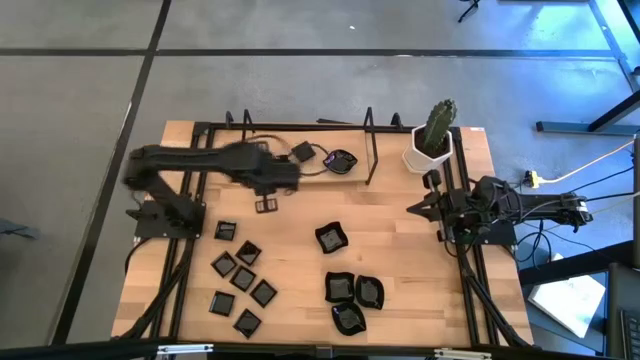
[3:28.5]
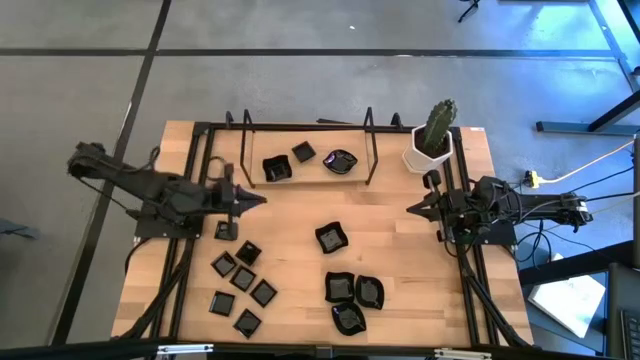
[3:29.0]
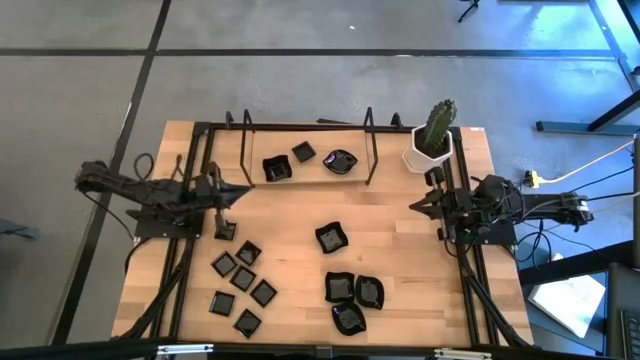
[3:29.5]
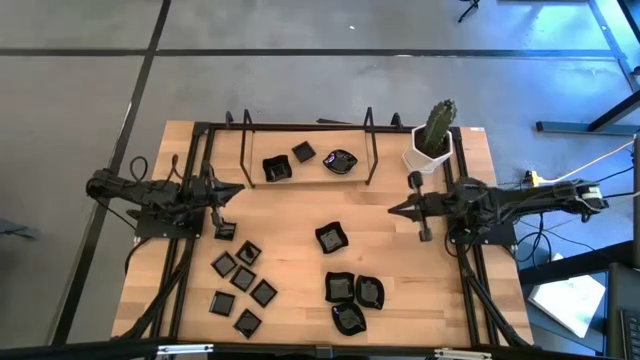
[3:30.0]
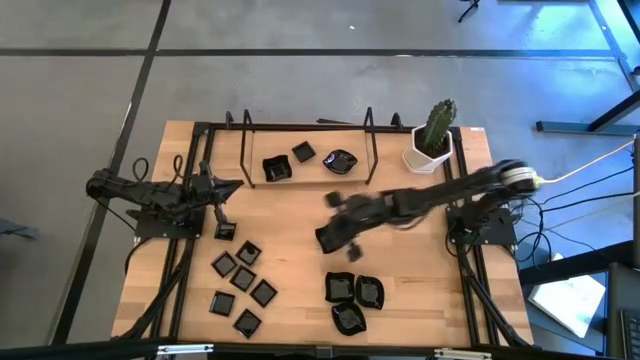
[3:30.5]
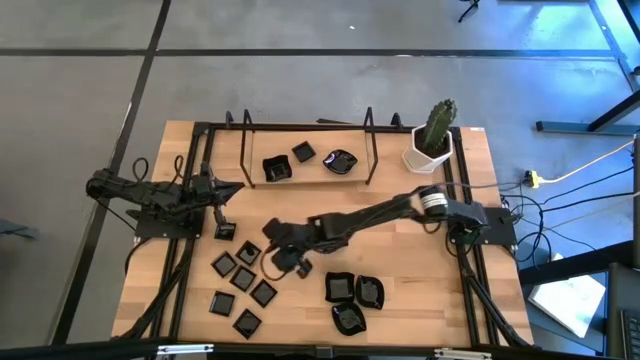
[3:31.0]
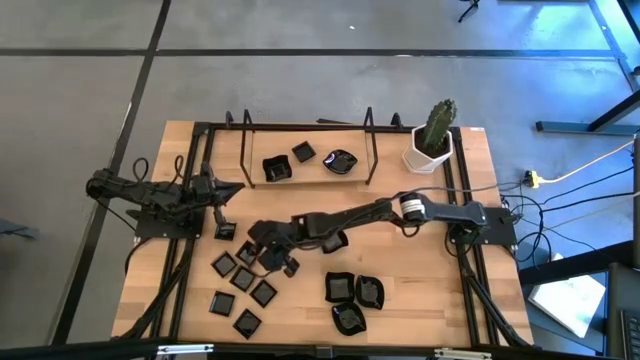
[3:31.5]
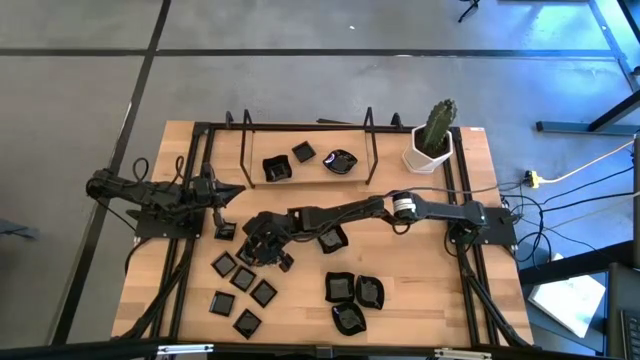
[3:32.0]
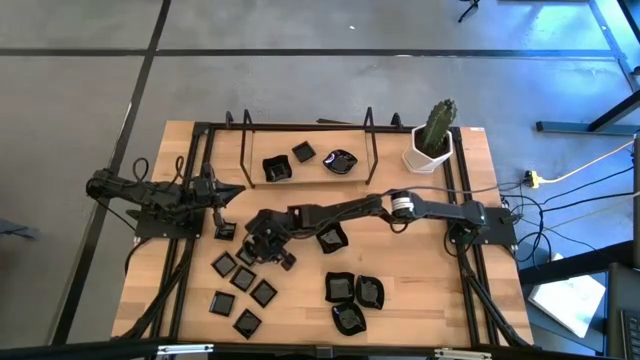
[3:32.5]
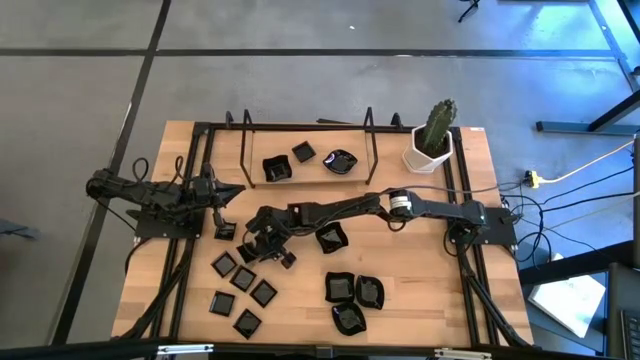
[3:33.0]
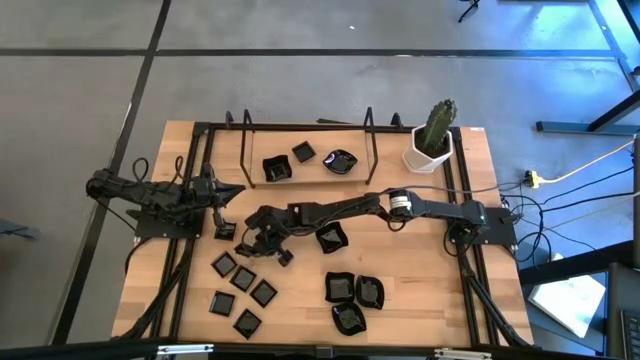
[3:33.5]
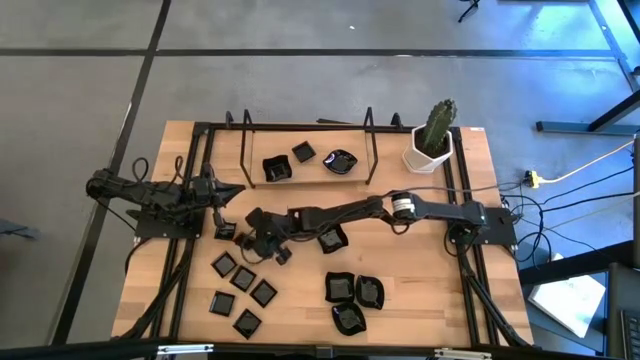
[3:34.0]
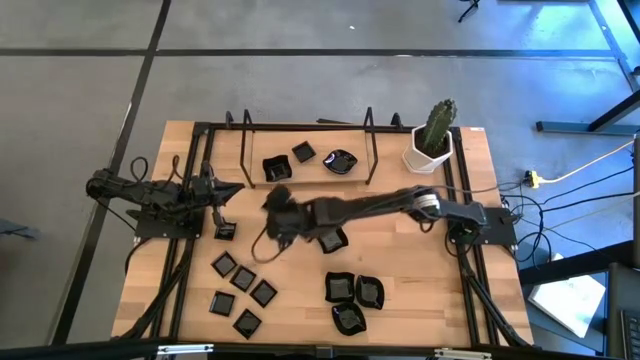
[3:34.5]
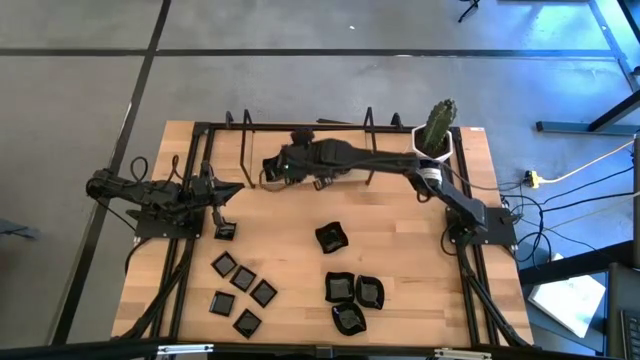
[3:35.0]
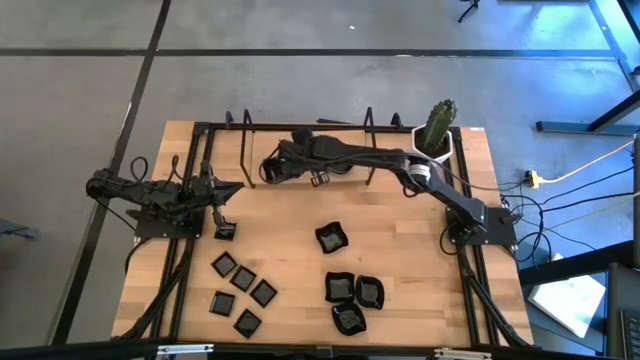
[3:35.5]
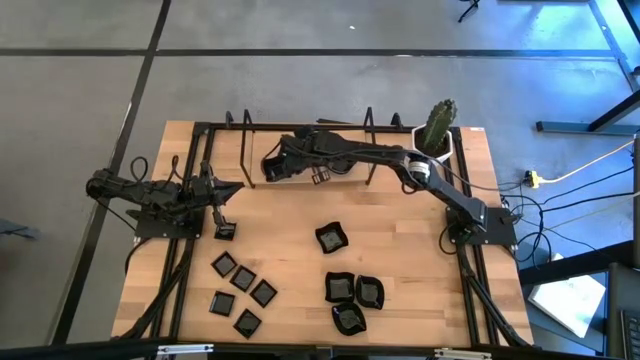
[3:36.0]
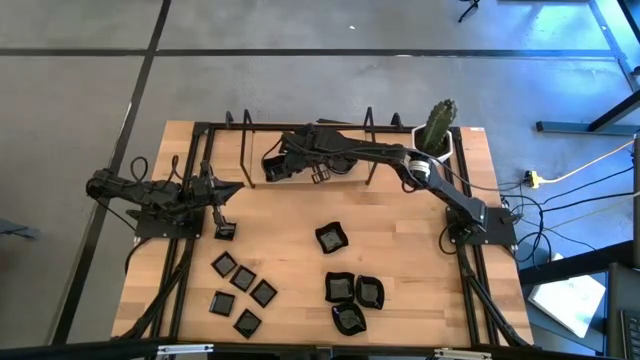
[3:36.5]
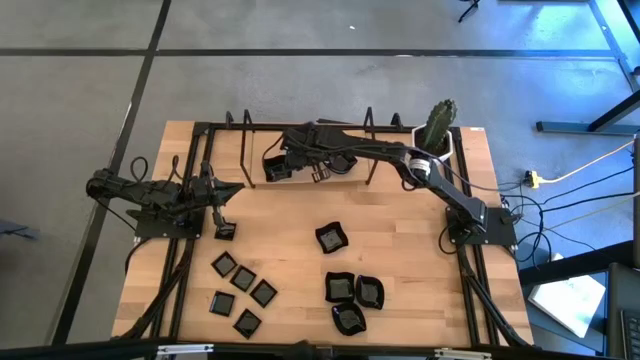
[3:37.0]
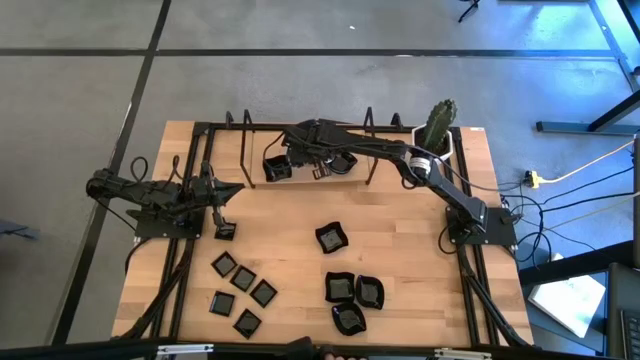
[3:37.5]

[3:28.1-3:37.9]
Task: Pick & Place Mini shaped plates
Stack the square plate on top of the square plate on the shelf

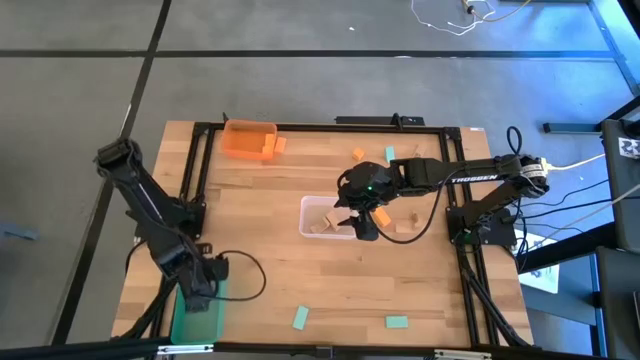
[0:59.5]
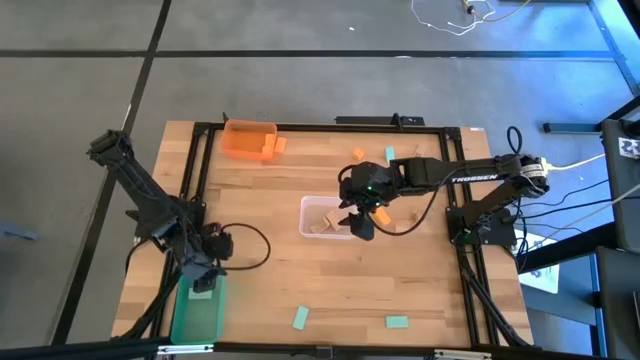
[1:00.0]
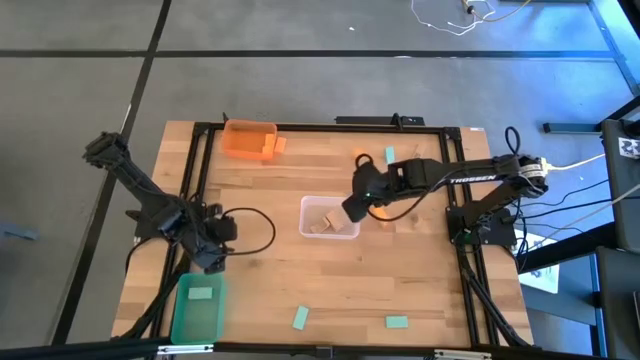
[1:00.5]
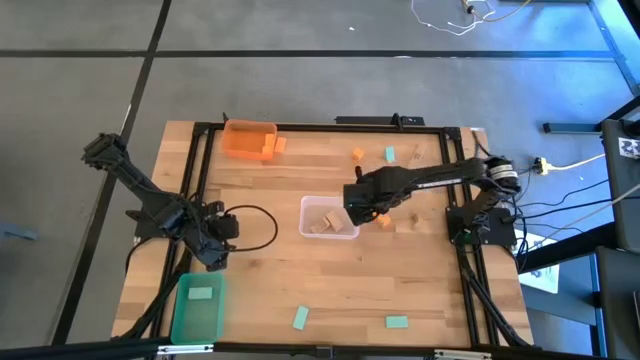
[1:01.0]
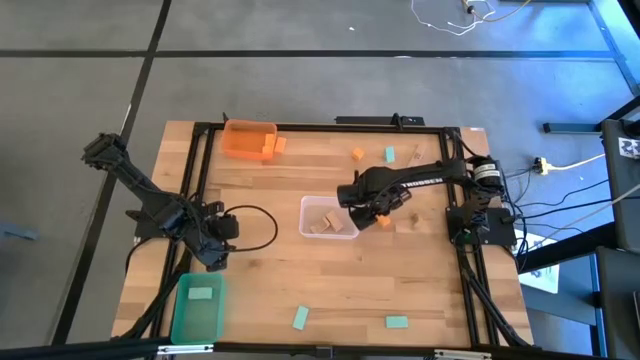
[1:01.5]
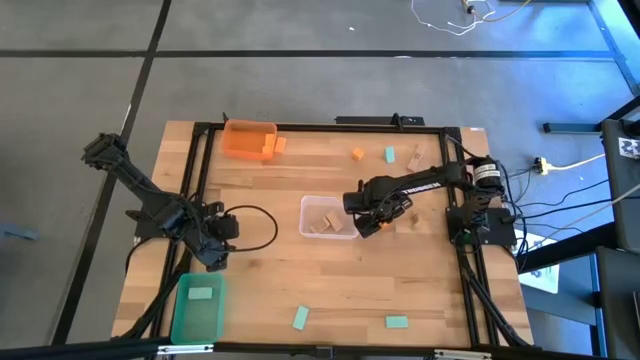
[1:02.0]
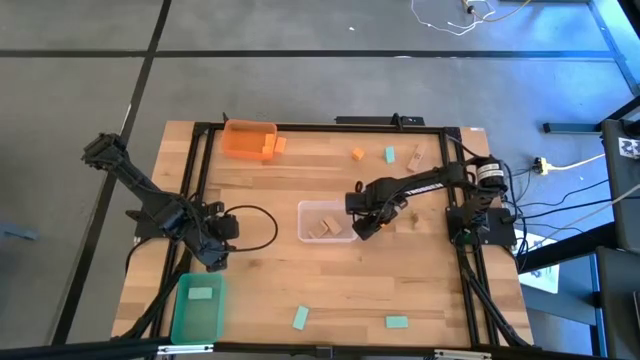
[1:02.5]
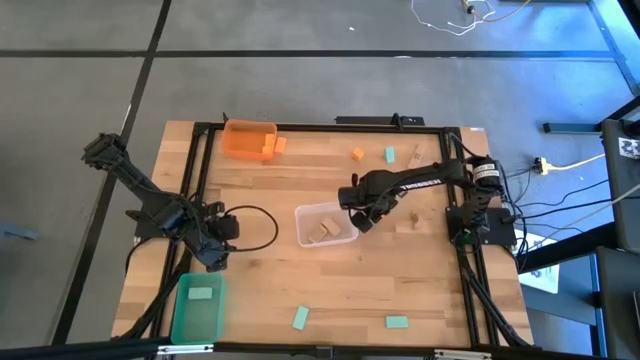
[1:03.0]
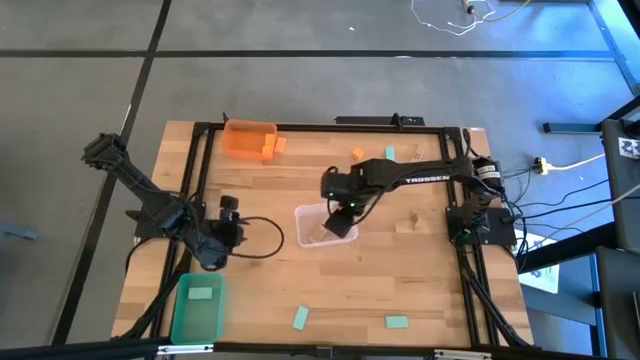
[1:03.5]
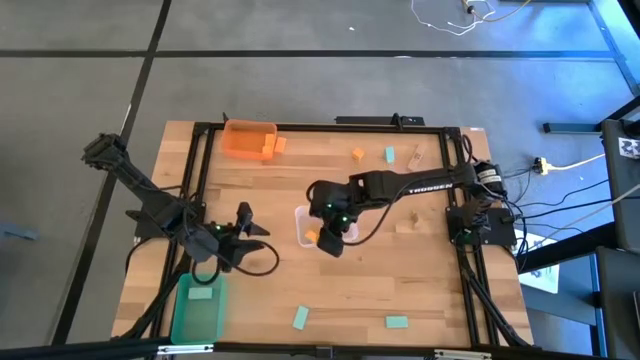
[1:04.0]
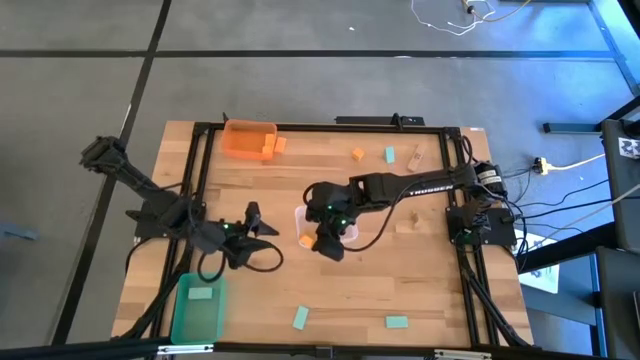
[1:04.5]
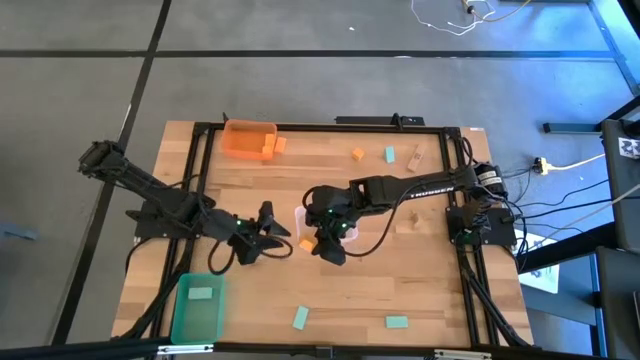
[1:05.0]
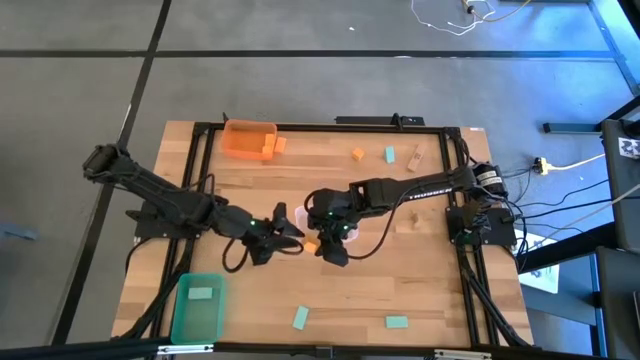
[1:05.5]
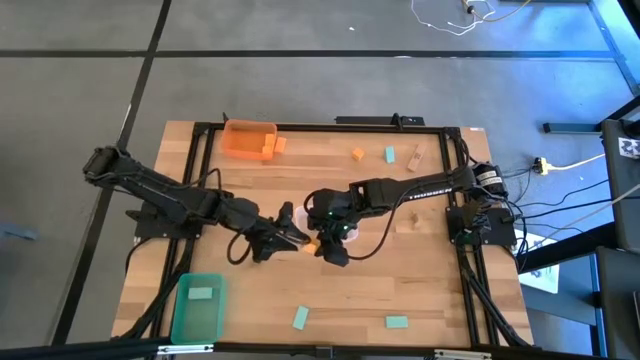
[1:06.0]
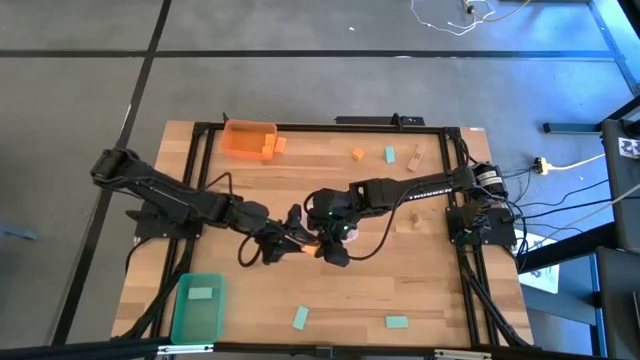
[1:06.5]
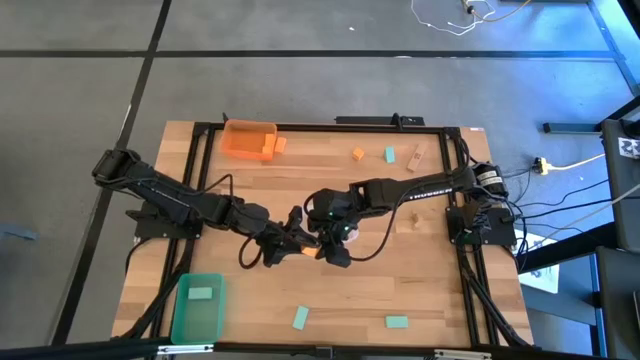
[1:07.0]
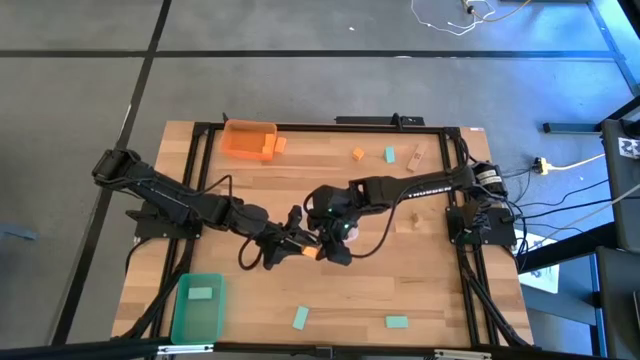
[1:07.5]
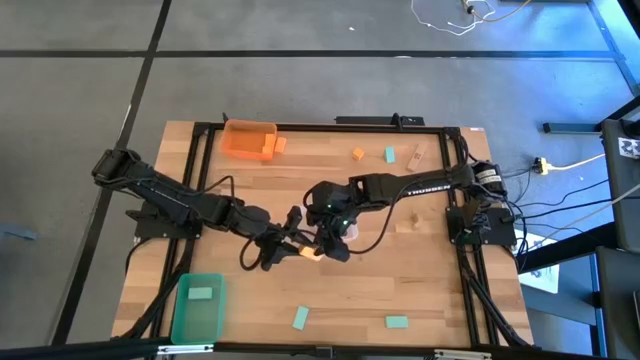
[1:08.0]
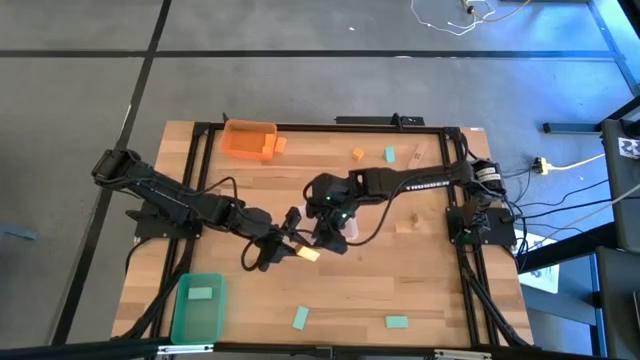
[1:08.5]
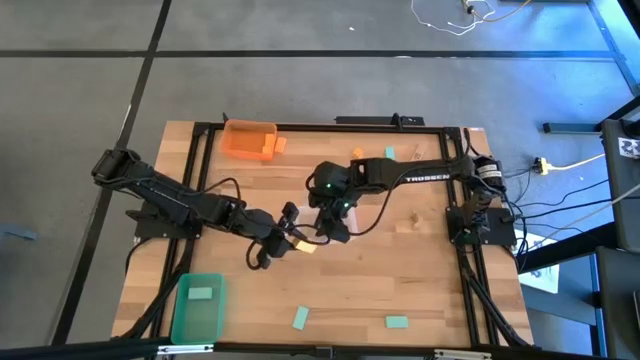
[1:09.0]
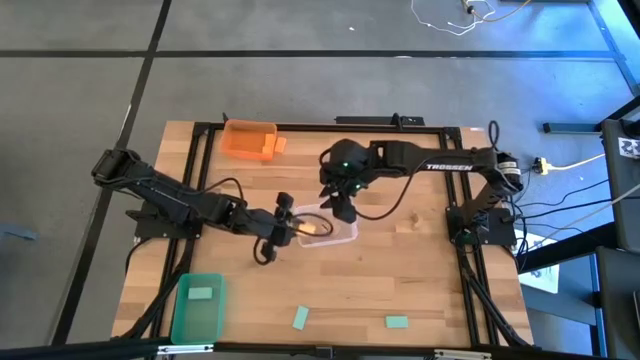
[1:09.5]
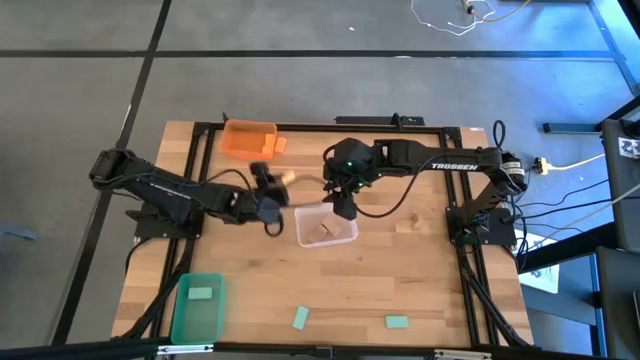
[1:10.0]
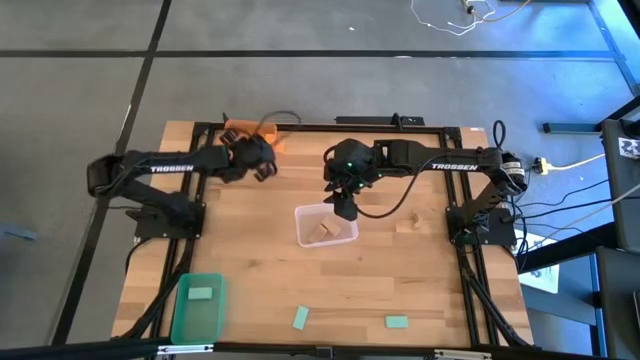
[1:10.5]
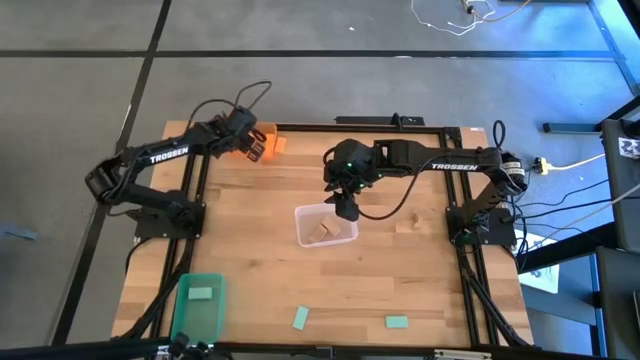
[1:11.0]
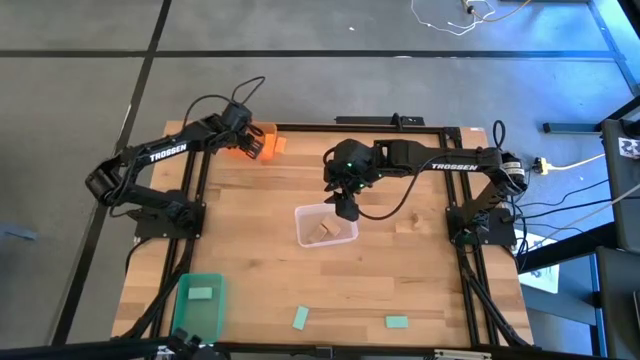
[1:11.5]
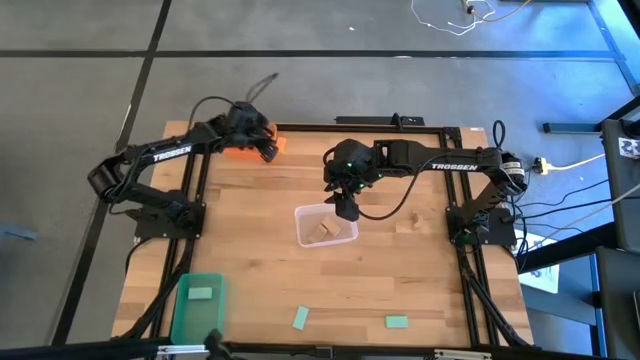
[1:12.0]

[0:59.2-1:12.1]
Task: Sort & place blocks by color
Put the yellow block into the orange bin
